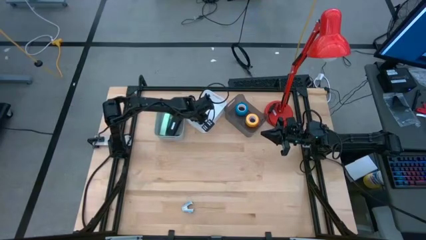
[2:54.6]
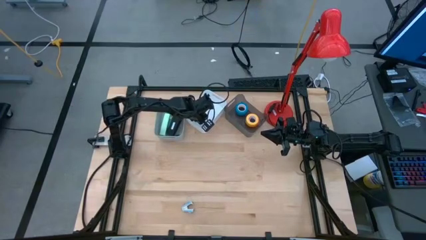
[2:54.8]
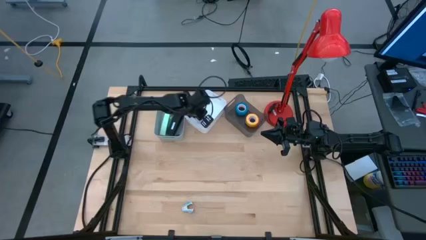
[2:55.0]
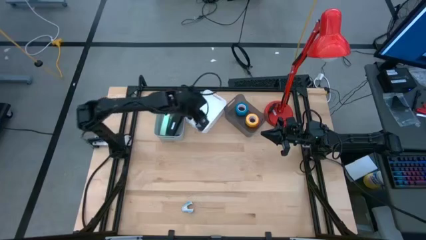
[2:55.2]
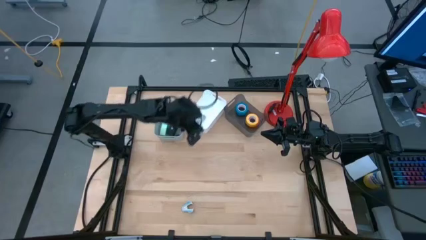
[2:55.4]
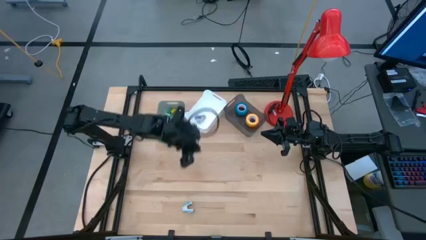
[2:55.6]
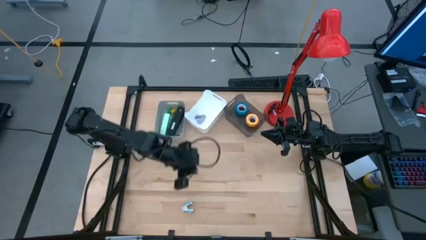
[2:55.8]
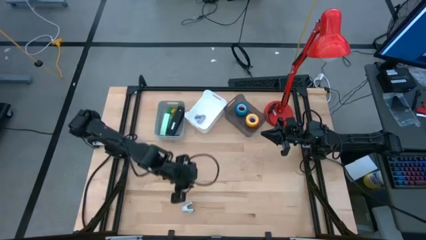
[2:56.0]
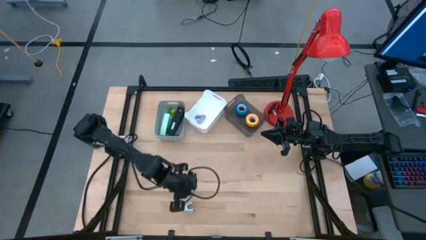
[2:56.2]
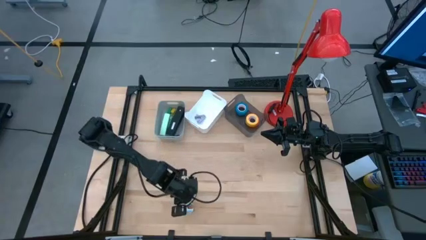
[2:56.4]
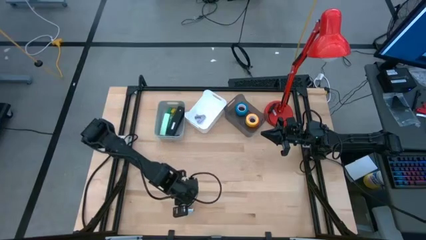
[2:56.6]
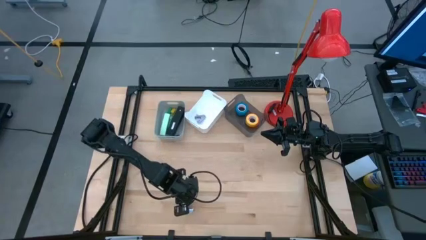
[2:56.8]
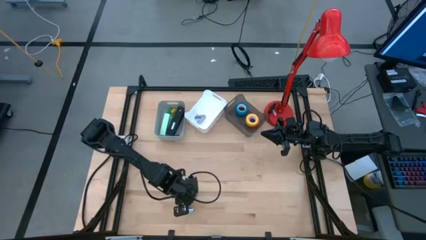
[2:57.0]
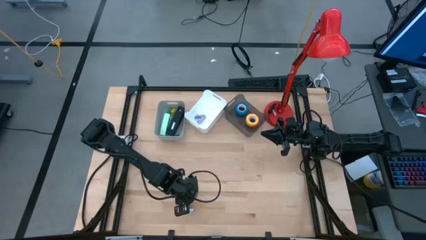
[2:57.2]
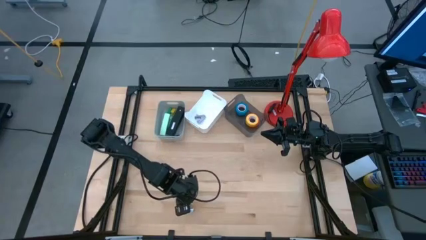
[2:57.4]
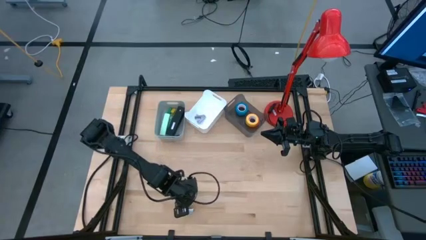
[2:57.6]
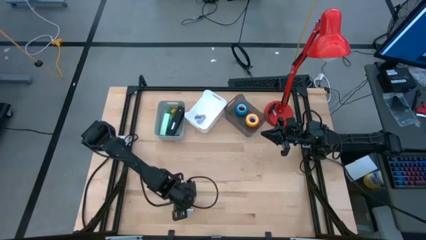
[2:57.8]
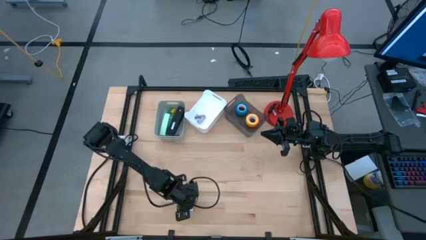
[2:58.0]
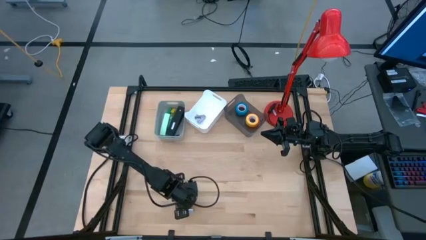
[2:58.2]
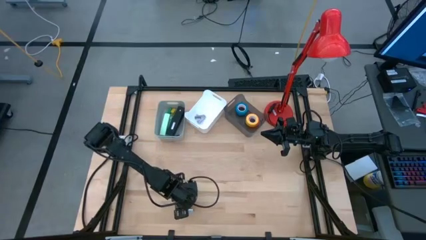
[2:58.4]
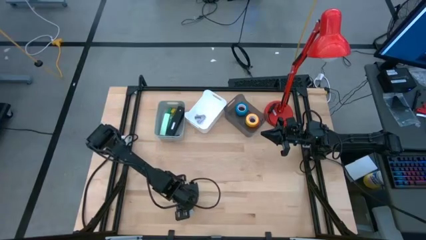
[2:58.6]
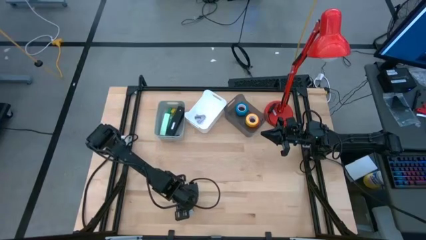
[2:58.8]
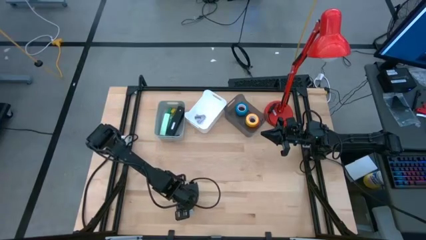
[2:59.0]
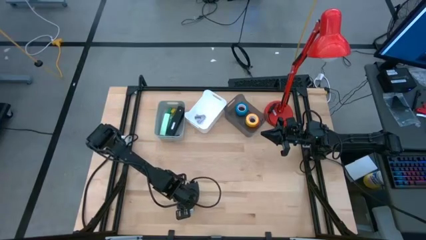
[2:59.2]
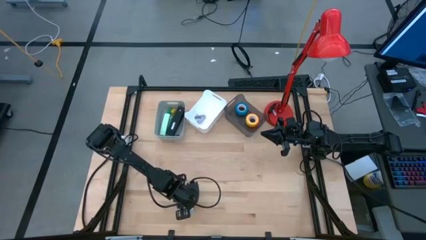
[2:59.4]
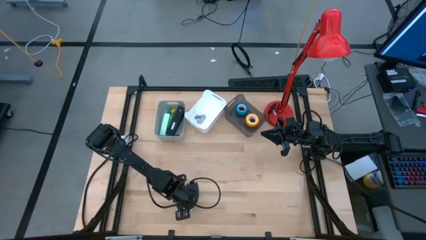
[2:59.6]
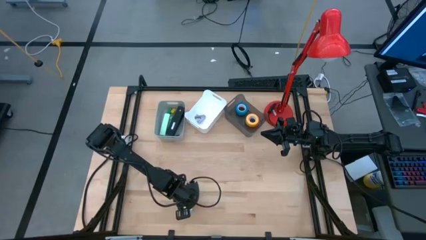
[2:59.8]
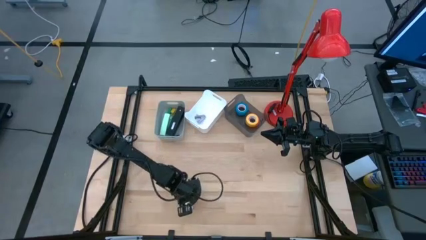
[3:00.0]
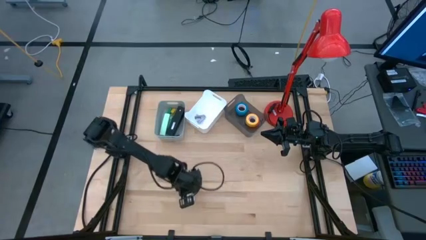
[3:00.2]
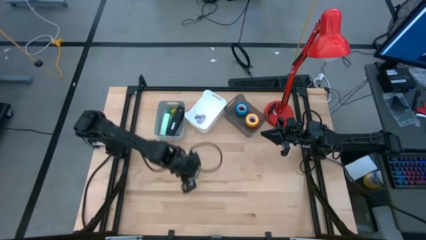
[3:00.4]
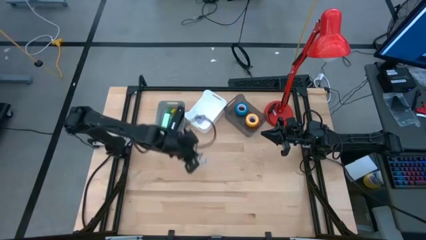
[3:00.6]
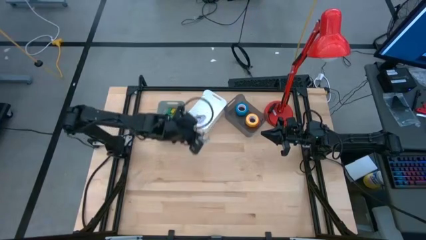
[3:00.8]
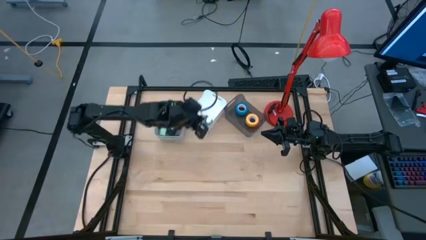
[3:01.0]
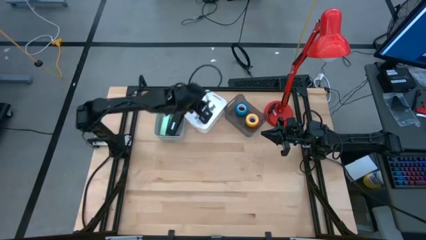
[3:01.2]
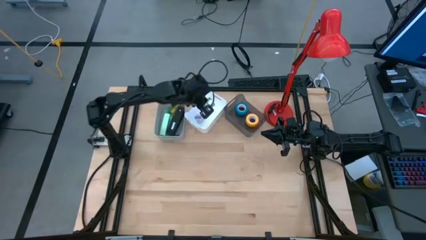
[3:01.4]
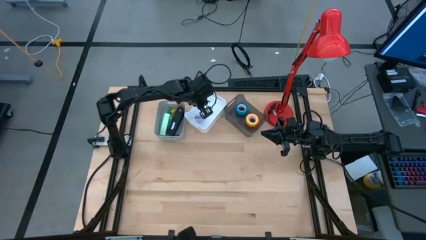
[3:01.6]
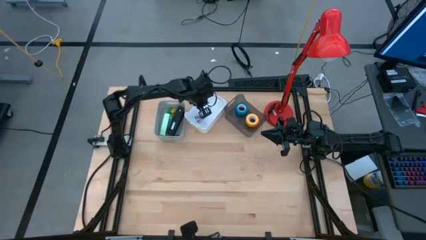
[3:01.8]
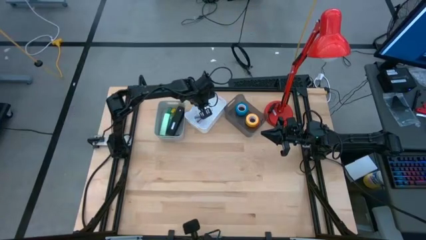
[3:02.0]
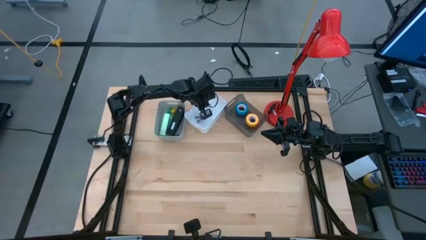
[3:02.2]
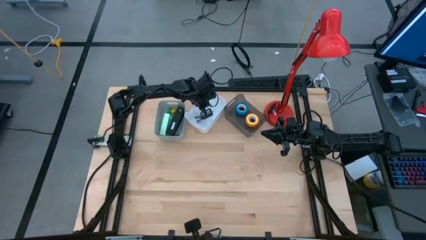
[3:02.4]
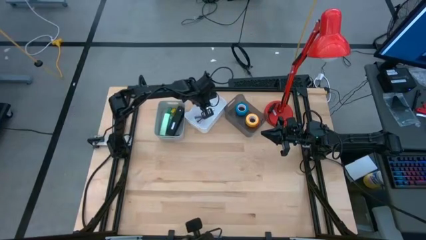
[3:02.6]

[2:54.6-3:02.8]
Task: Pick and place Stapler, Stapler remover, tape
Put the light blue staple remover into the white bin

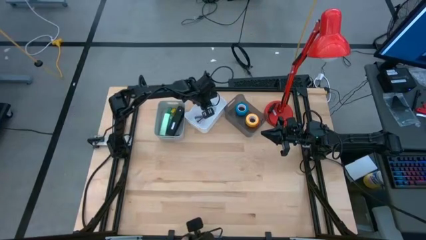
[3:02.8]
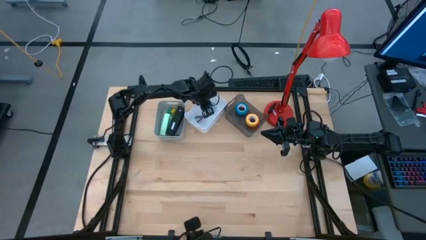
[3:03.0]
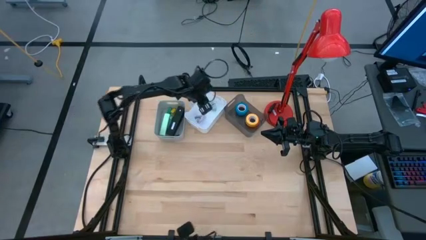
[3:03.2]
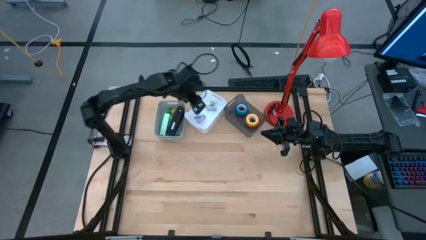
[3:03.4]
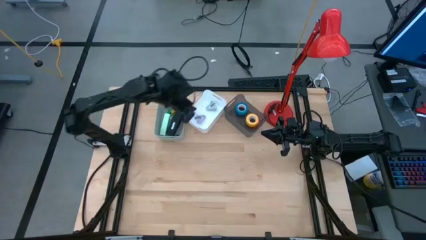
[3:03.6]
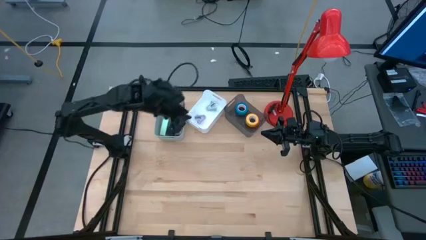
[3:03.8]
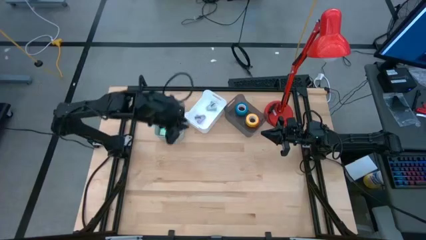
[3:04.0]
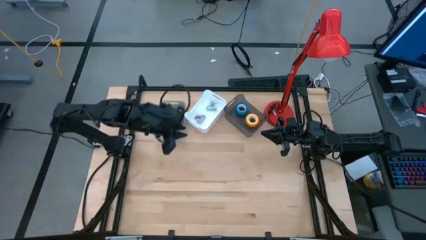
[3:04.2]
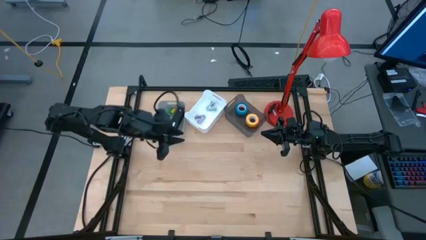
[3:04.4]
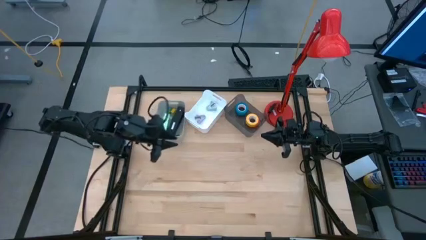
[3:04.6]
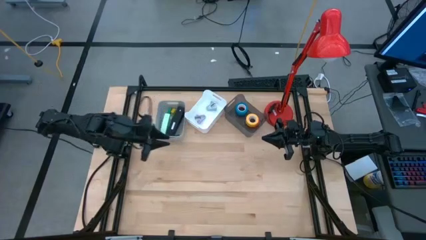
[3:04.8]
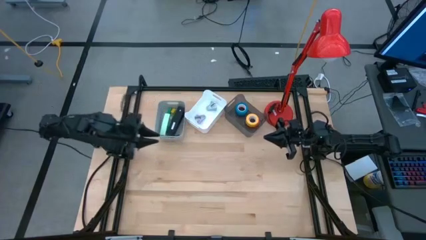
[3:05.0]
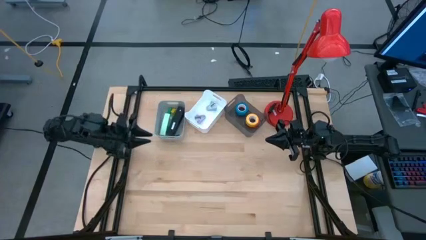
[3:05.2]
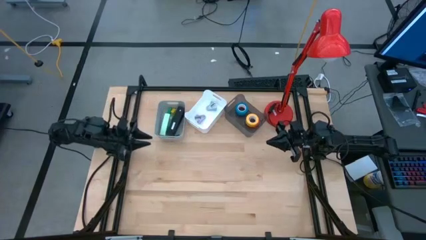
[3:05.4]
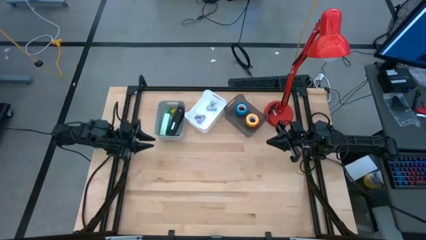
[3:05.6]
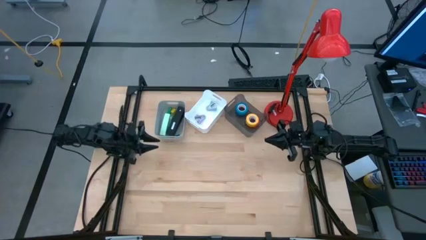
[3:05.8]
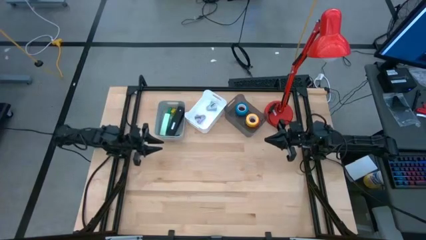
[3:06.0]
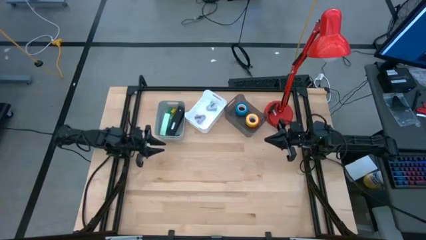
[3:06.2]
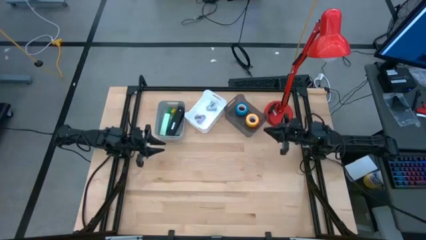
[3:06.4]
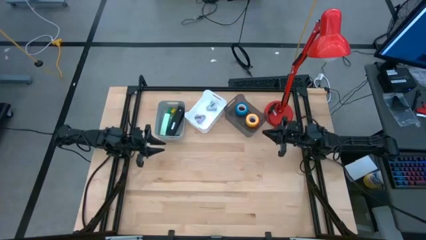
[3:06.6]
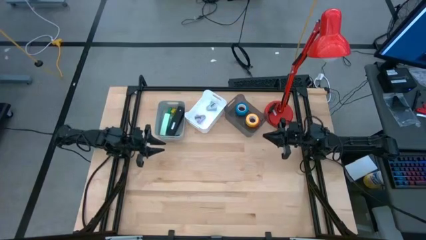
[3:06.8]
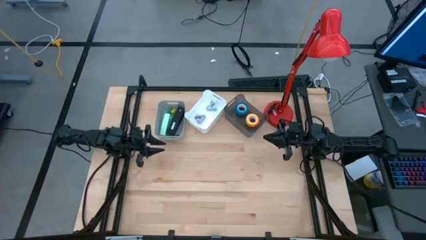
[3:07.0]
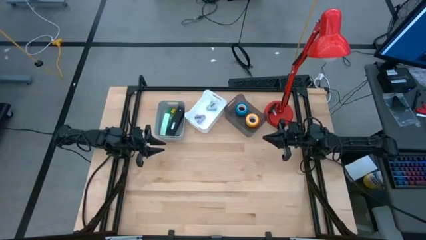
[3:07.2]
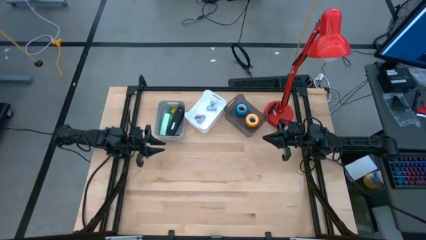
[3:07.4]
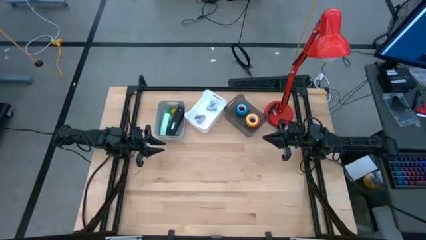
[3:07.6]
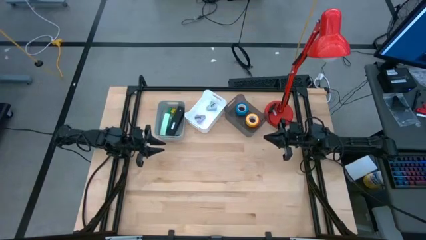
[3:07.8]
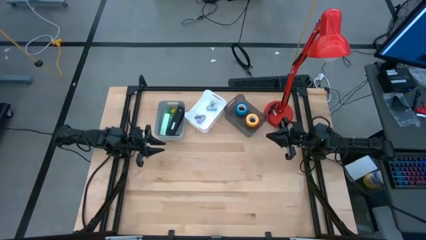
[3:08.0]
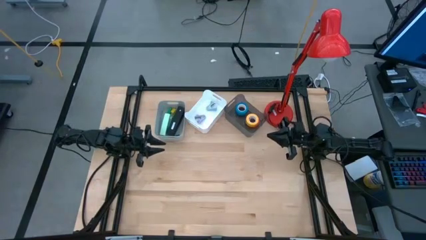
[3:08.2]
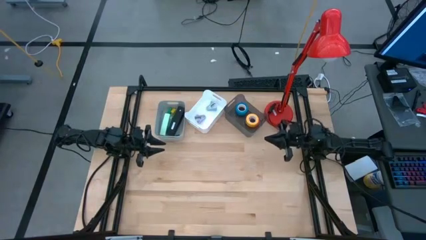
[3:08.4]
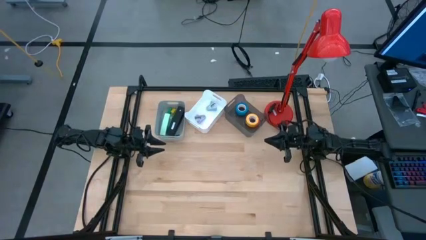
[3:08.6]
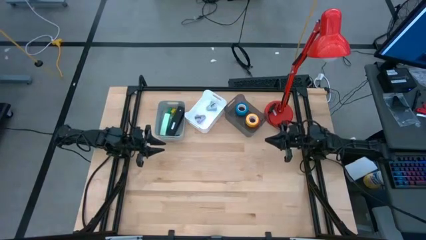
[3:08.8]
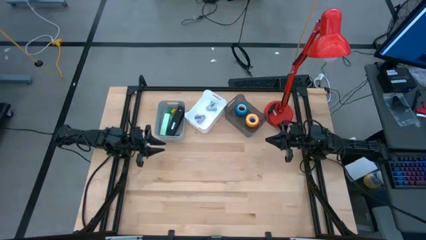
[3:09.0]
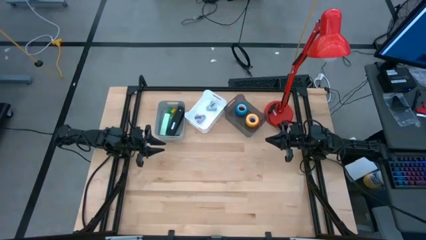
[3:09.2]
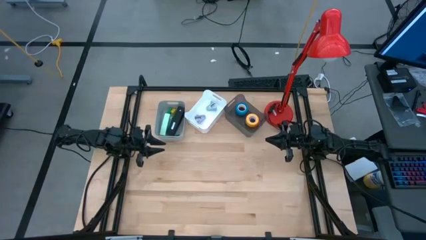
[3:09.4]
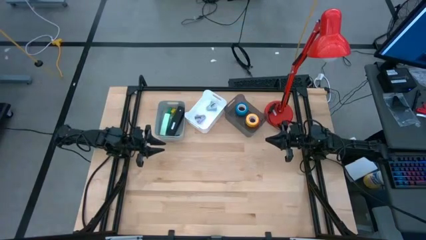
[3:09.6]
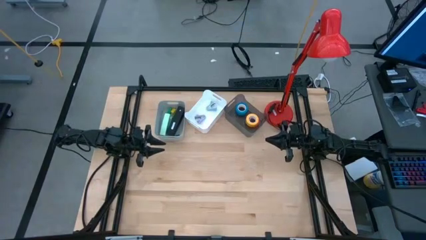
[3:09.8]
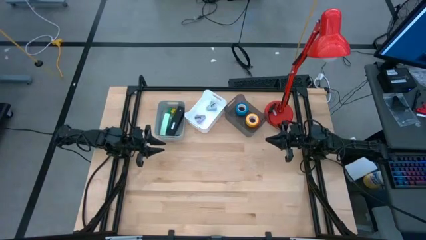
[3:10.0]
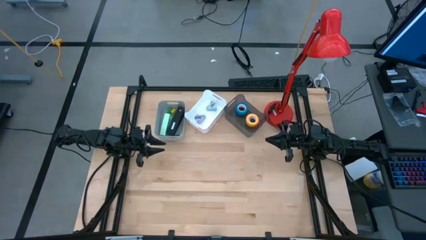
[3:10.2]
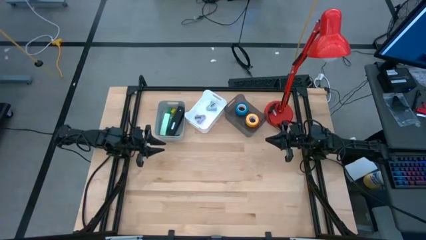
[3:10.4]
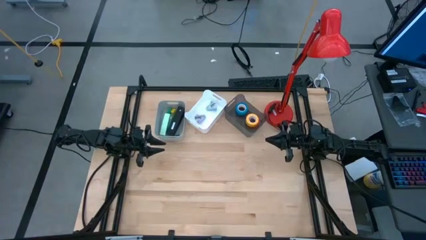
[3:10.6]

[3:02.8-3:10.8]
Return to Home Position
